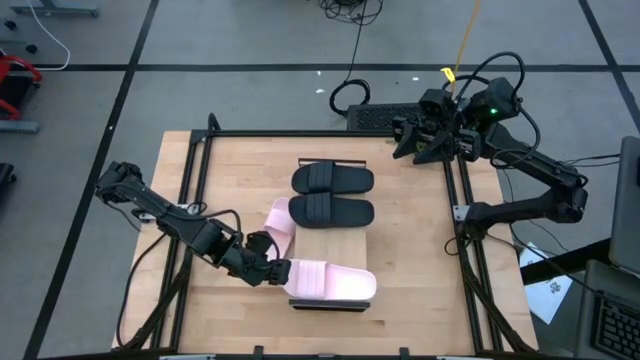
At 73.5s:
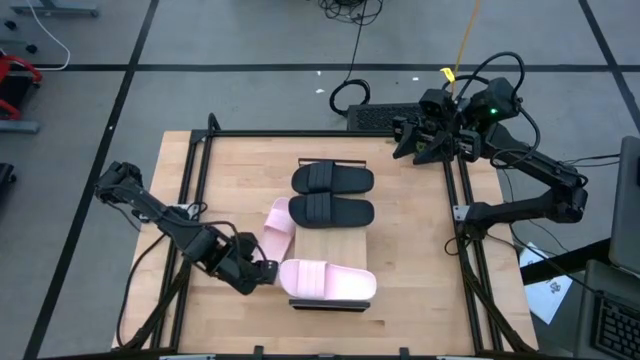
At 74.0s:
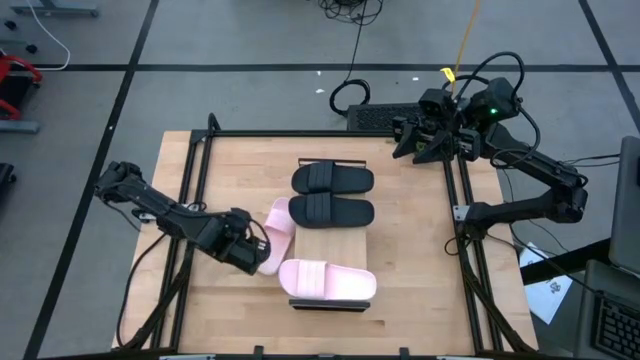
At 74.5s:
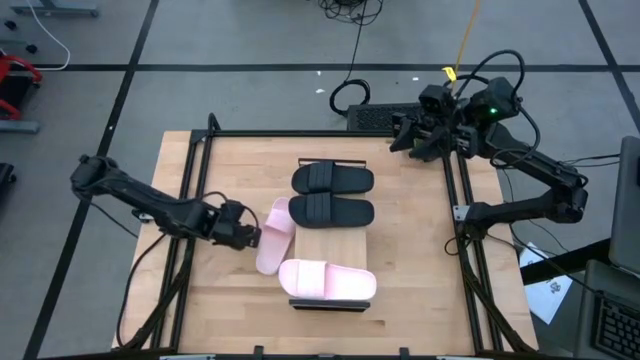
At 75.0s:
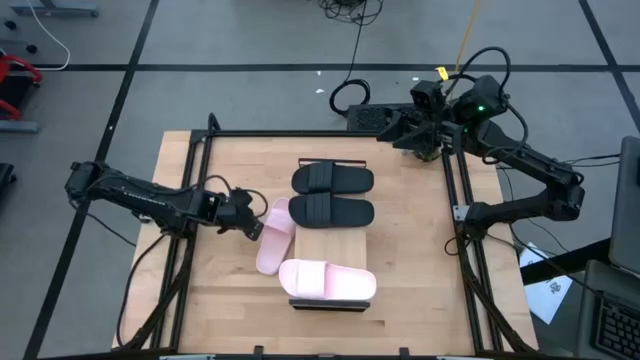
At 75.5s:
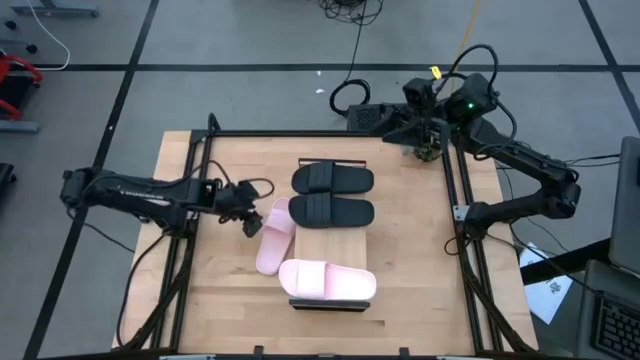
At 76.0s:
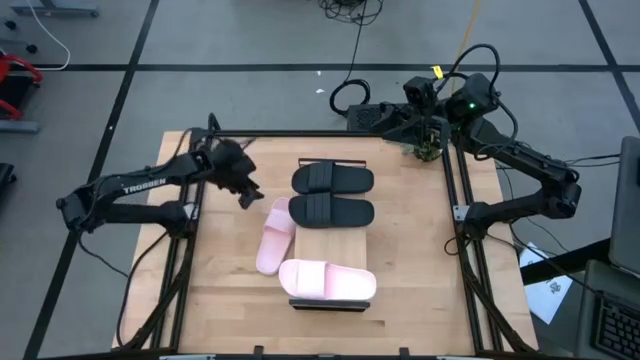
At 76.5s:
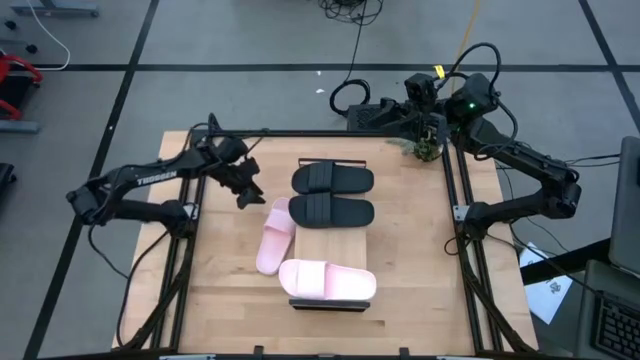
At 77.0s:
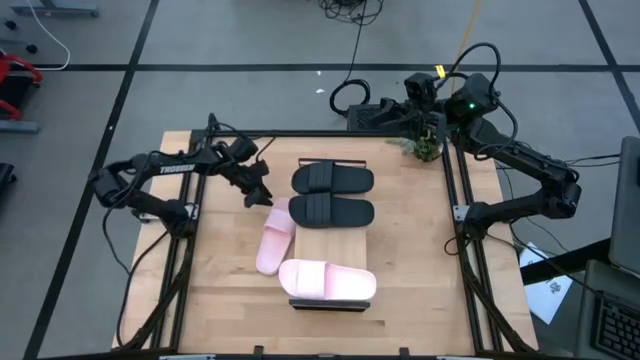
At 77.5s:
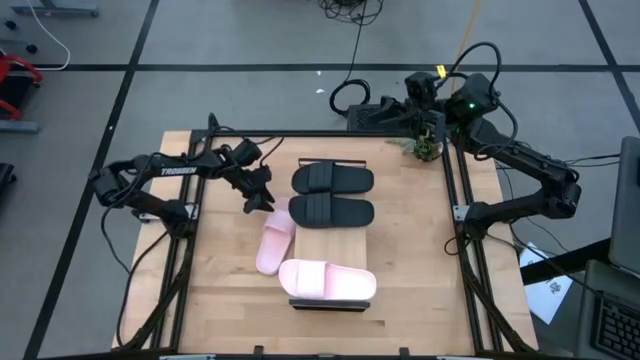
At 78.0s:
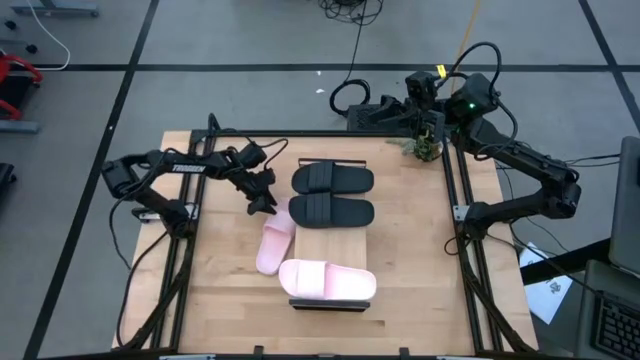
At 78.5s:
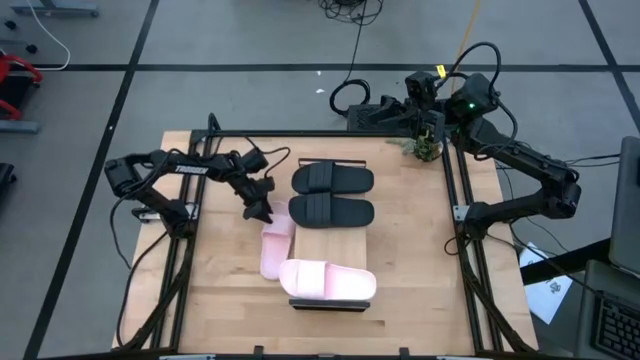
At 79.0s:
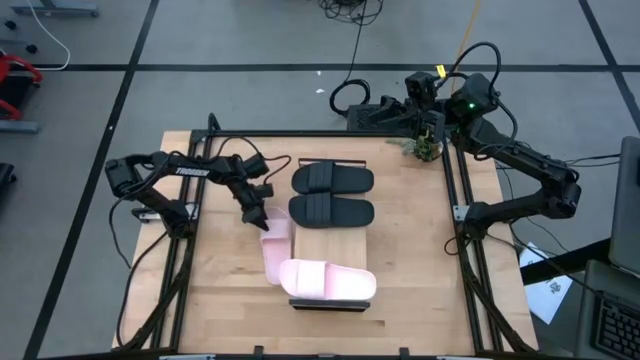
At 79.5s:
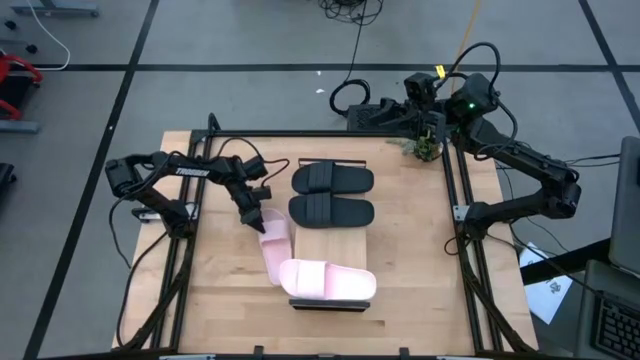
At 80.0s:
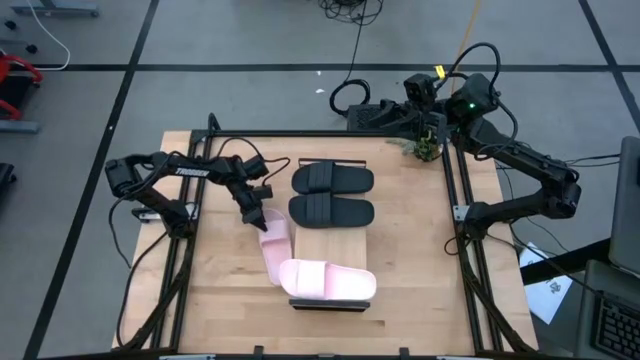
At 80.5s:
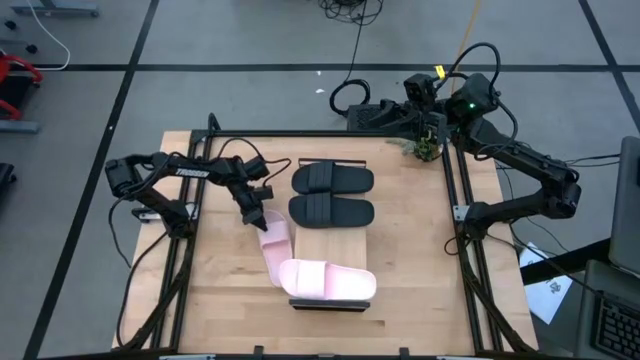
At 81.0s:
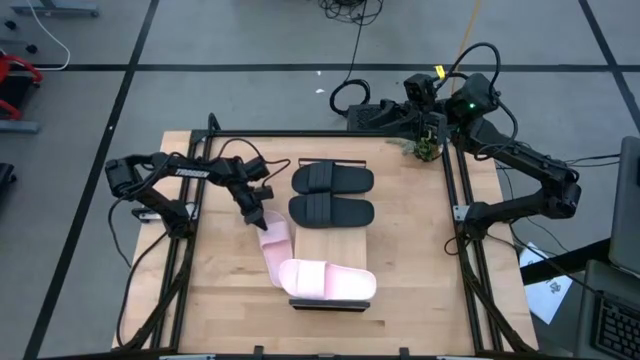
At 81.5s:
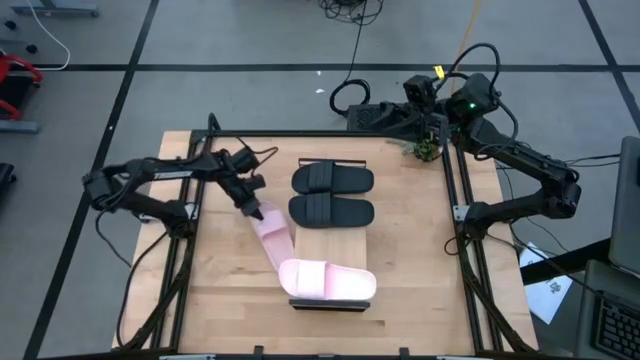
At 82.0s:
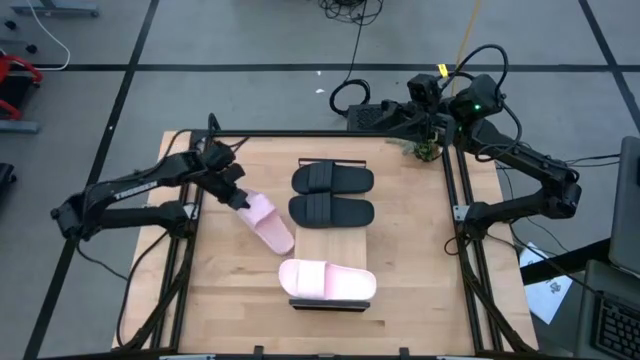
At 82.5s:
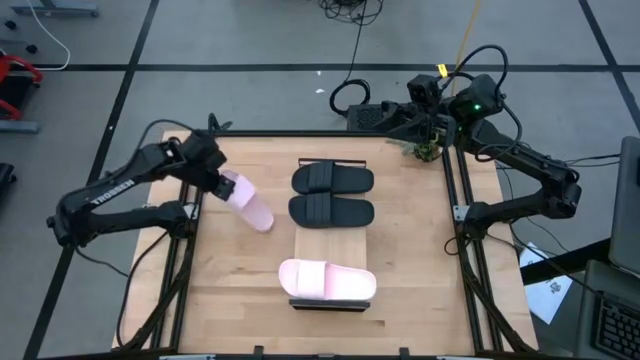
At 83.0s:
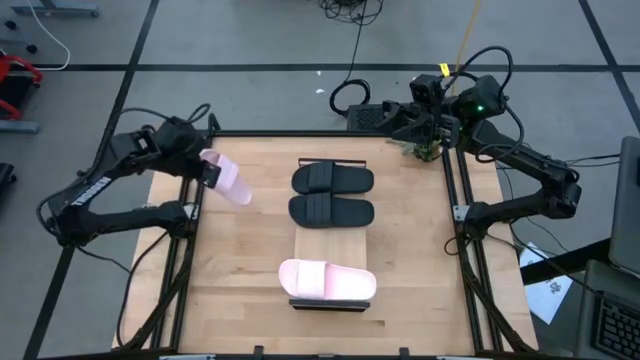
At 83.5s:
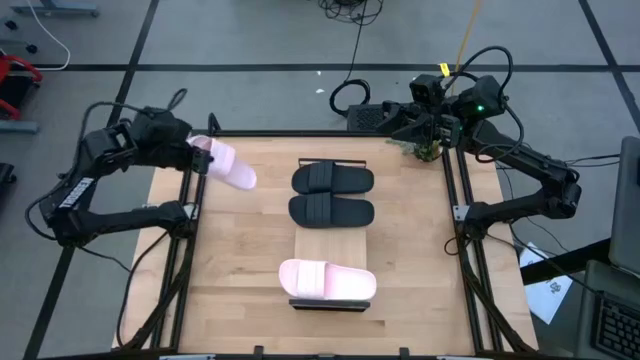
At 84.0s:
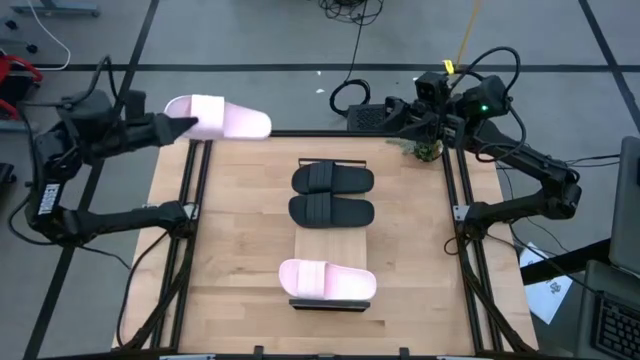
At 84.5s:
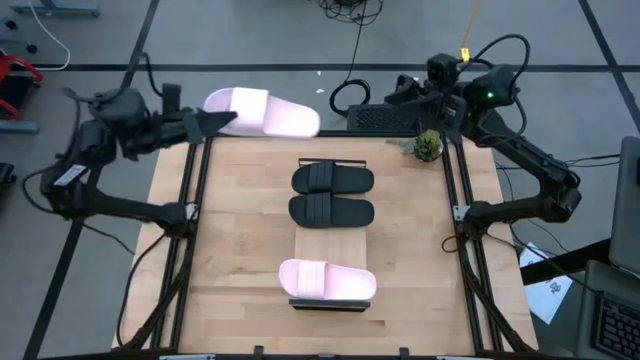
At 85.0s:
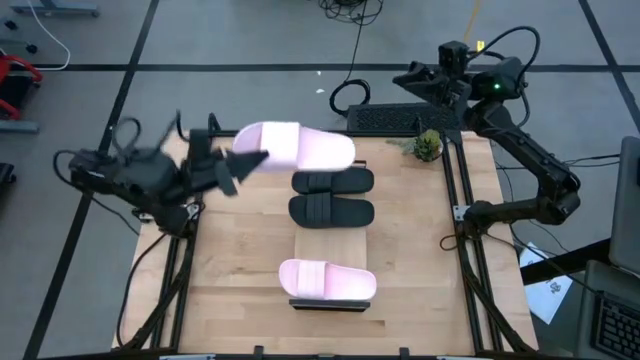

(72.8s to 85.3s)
Task: Pick and place slides into the shelf
Put the pink slide on the shelf

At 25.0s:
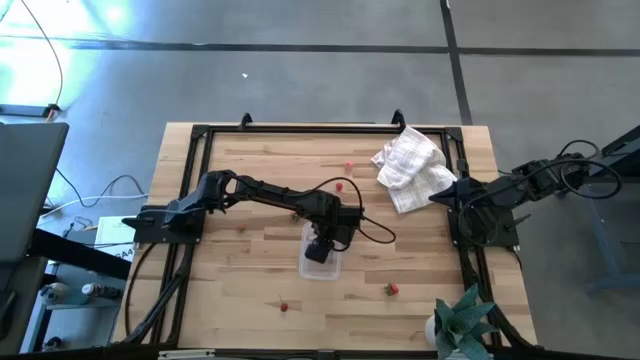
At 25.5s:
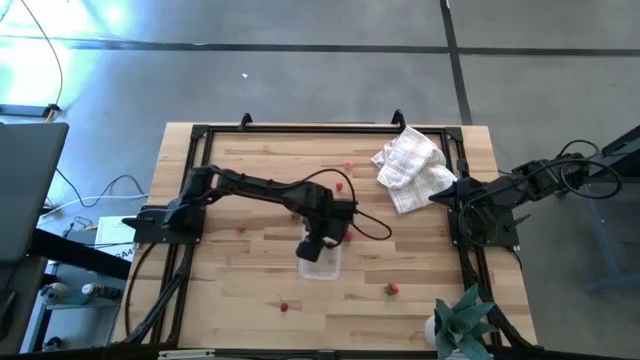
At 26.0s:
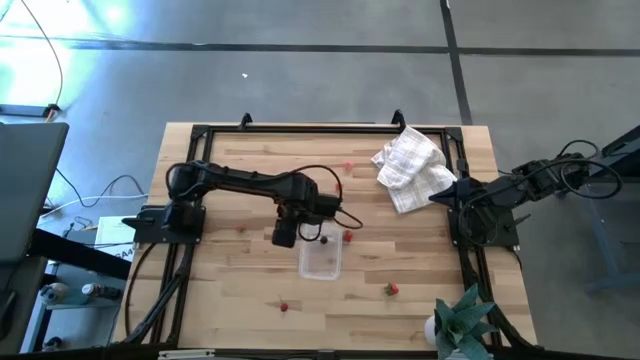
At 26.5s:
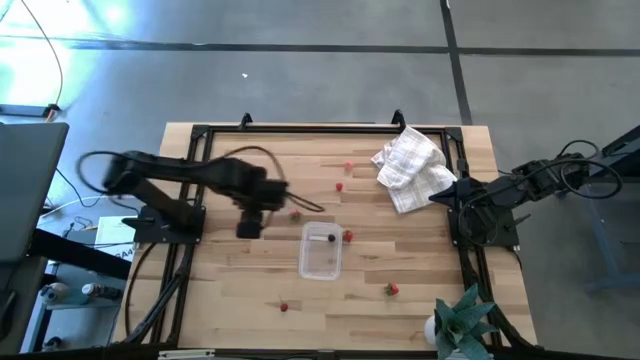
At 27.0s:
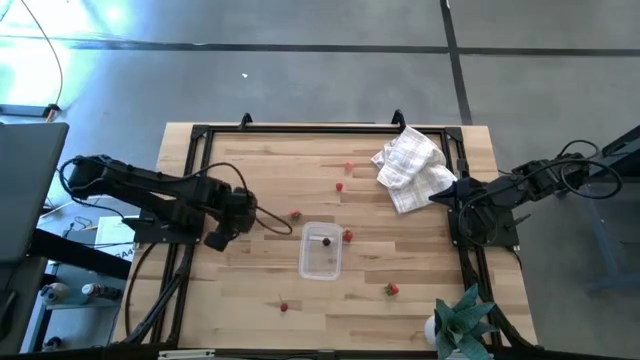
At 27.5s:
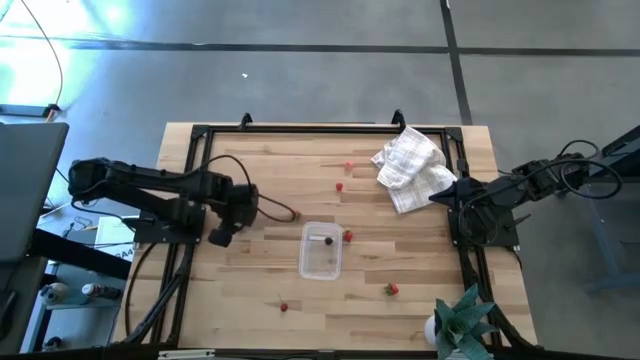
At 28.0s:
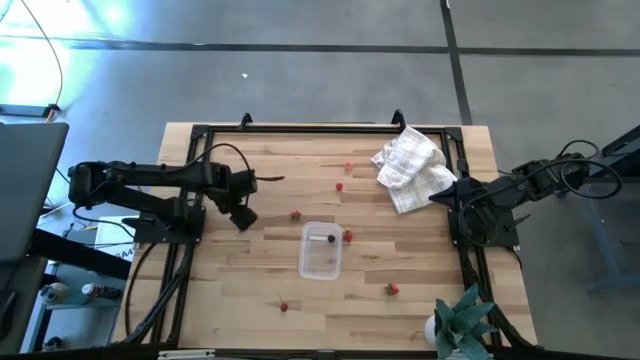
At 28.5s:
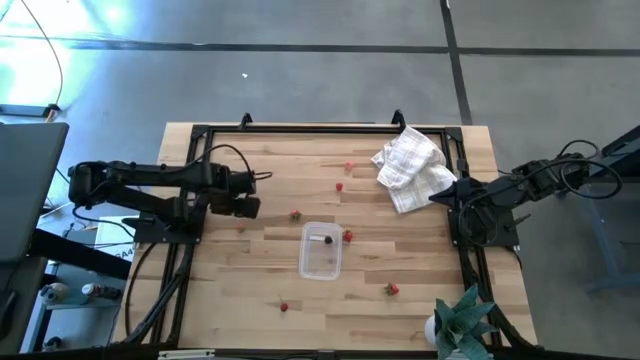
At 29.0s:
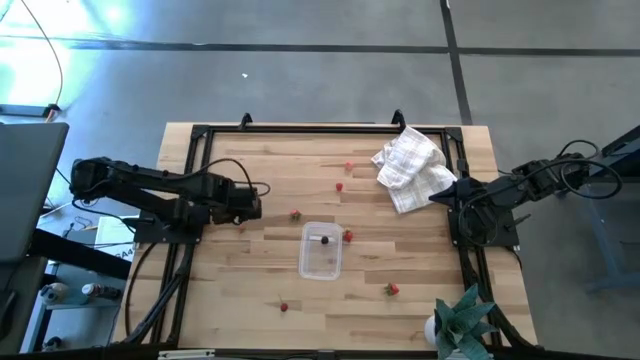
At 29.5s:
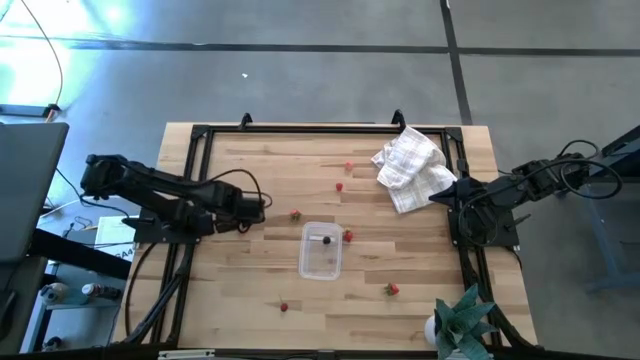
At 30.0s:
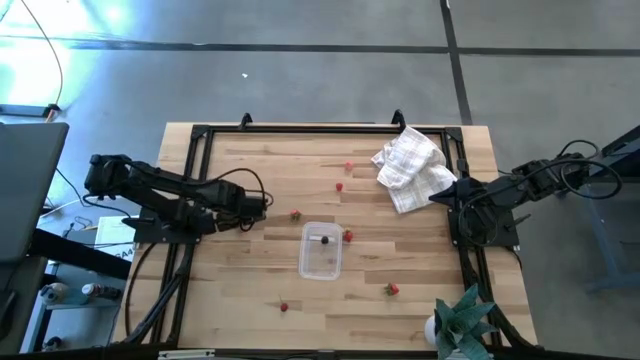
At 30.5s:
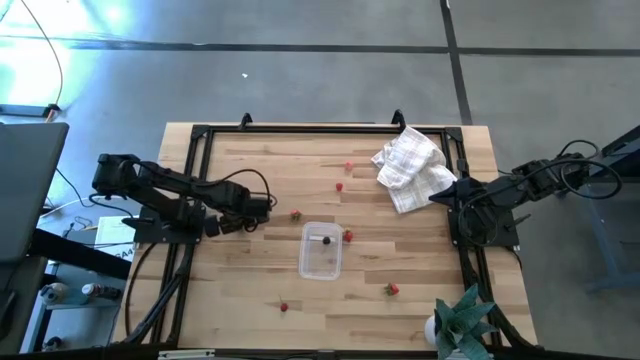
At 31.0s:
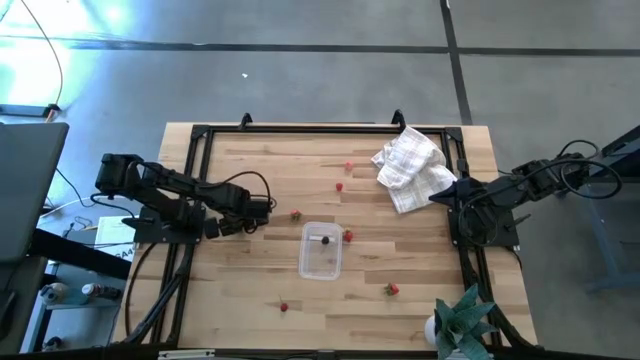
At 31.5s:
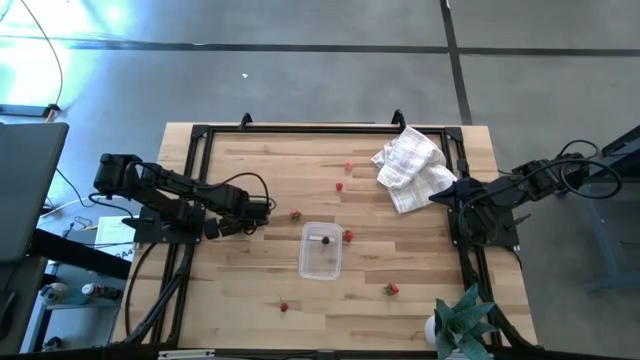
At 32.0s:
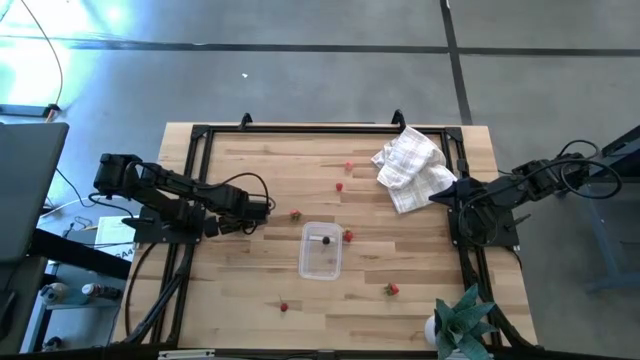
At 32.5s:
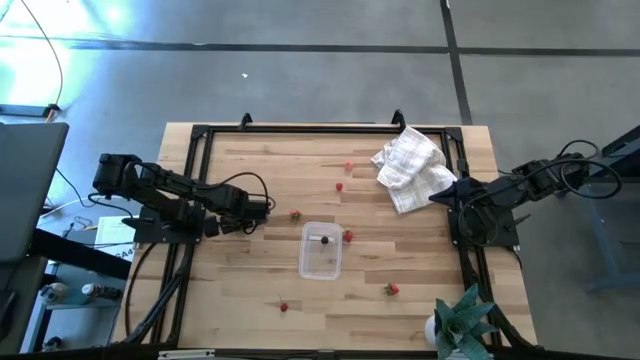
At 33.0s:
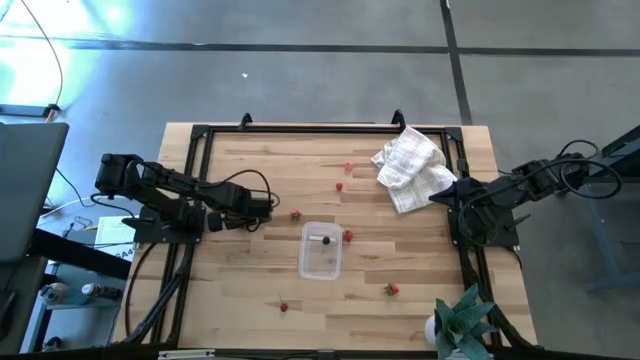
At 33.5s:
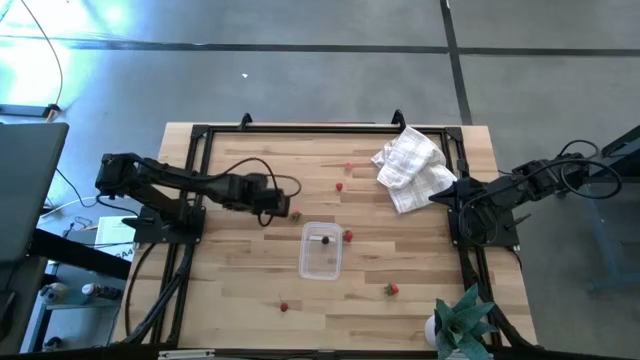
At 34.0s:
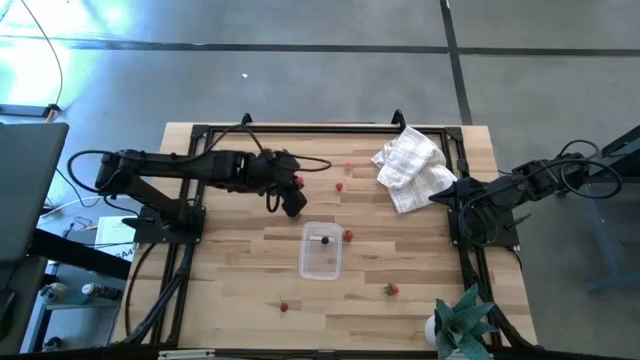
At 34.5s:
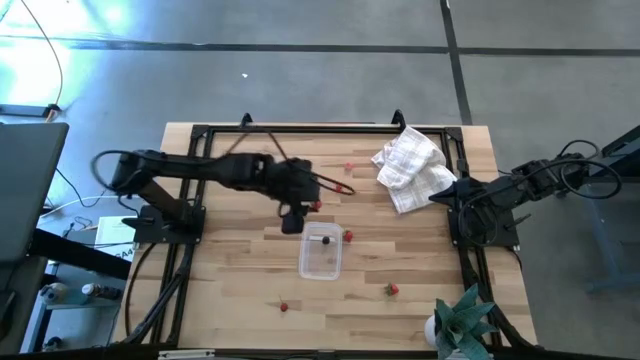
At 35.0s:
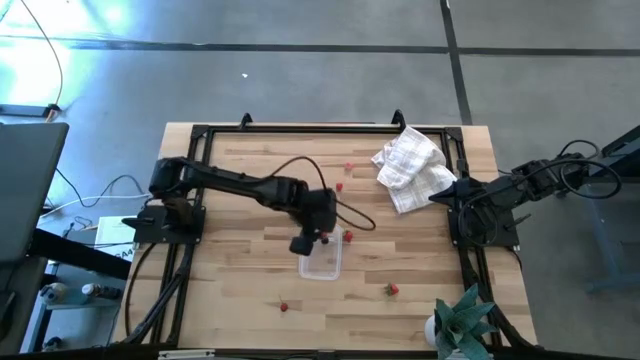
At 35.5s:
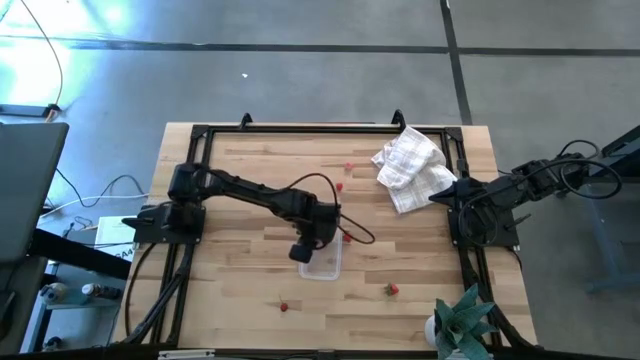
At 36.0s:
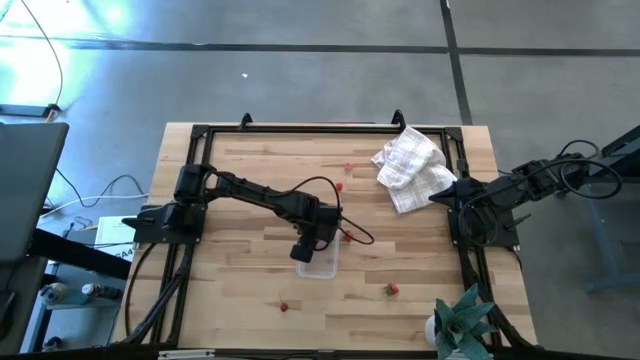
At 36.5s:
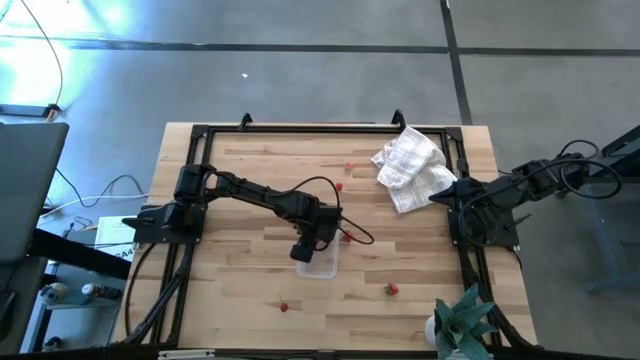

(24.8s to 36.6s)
Task: Pick and placing Produce into tupperware
Put the red strawberry into the transparent container
